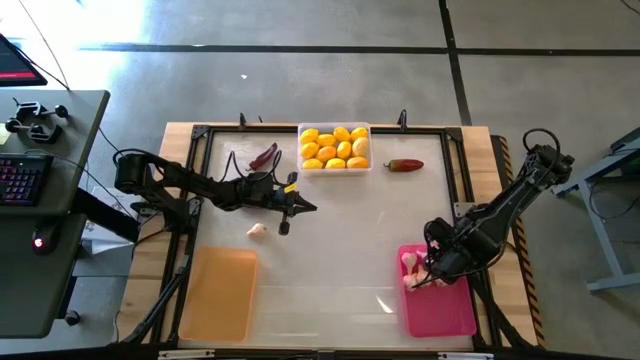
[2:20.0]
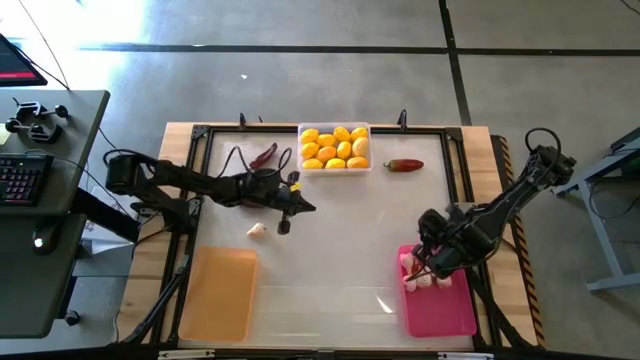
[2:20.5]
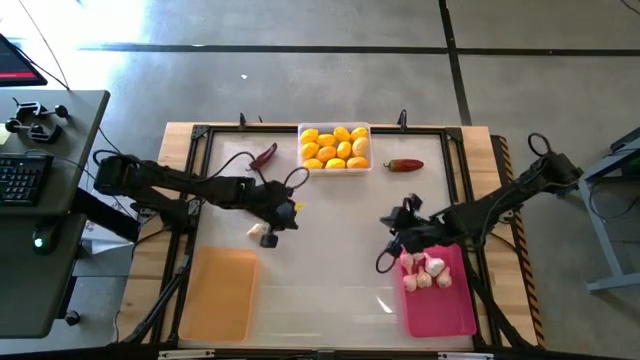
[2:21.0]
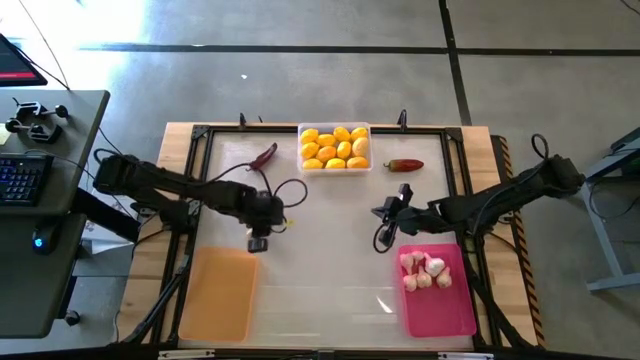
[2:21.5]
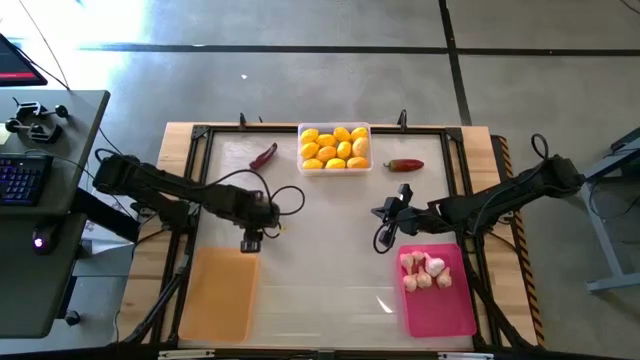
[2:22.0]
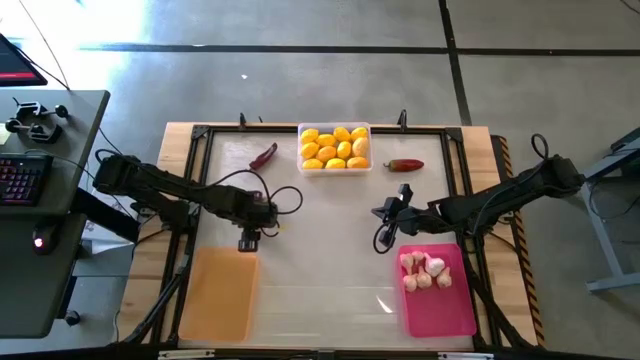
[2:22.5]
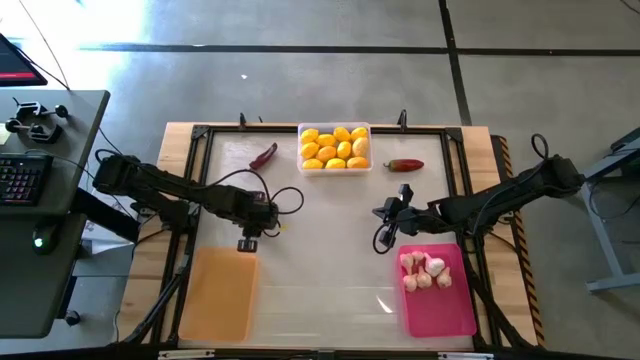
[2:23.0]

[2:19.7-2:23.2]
Task: Sort produce into baskets
Put the garlic into the pink bin

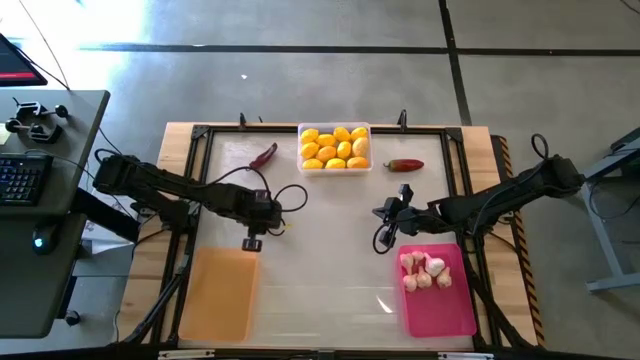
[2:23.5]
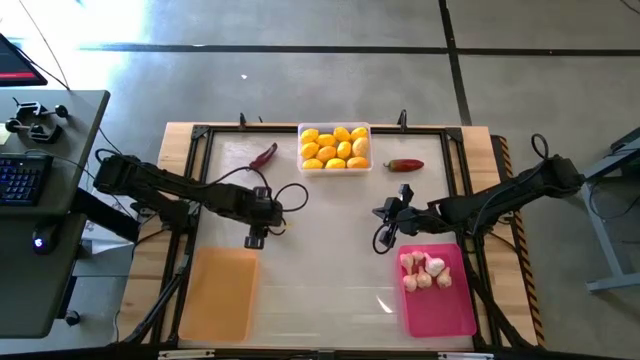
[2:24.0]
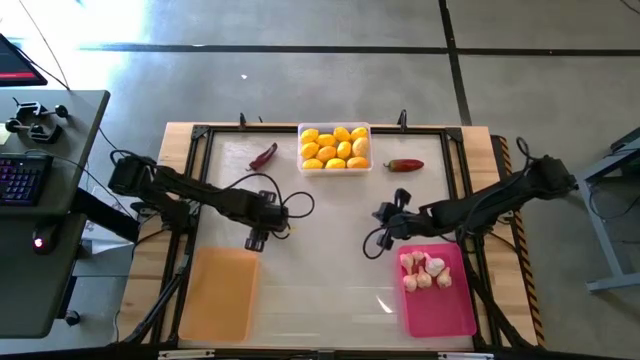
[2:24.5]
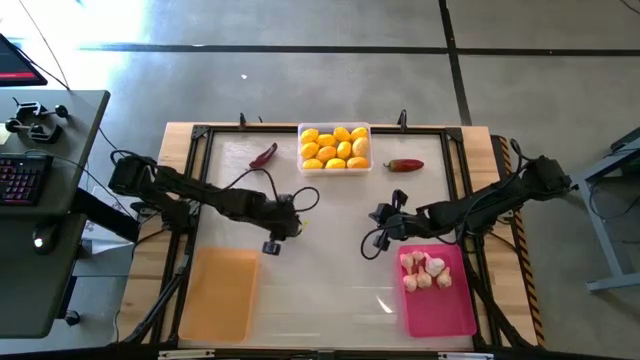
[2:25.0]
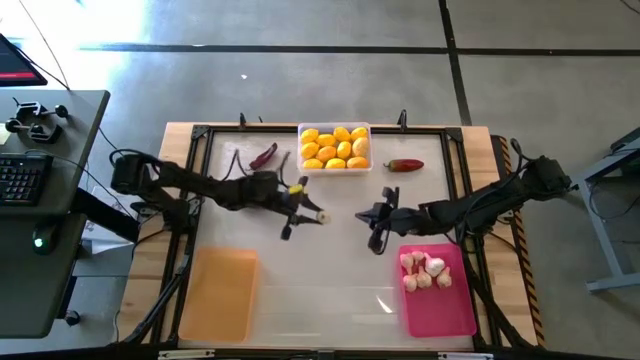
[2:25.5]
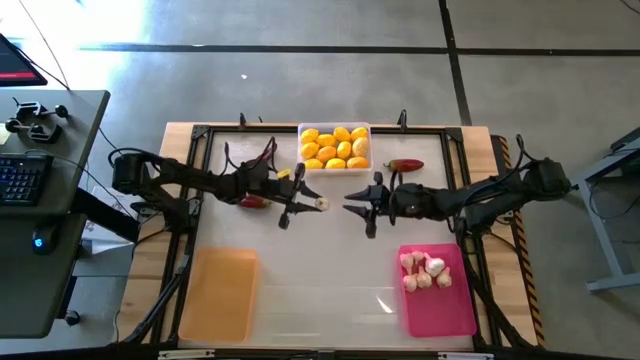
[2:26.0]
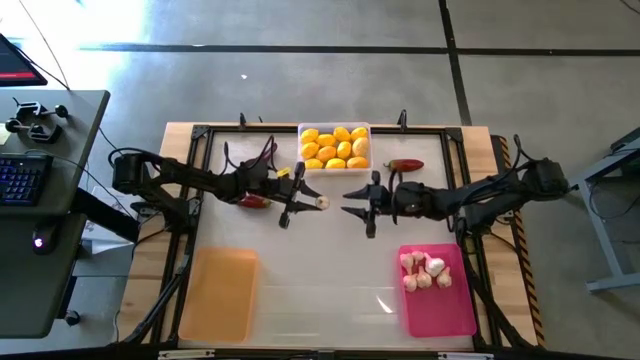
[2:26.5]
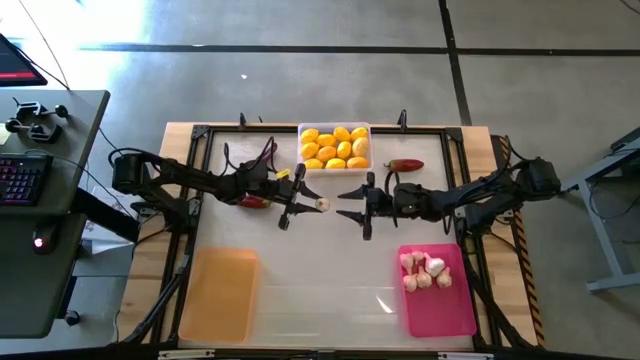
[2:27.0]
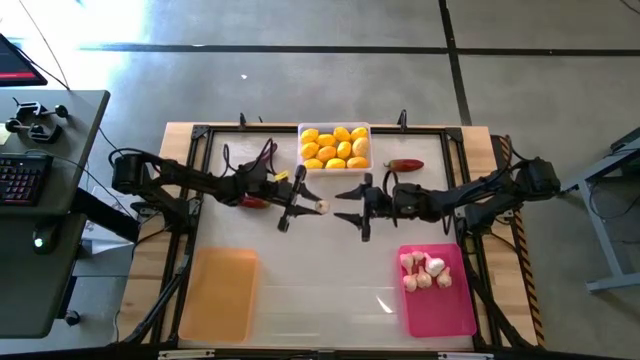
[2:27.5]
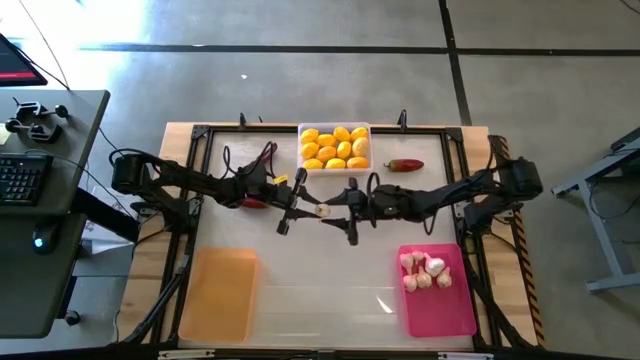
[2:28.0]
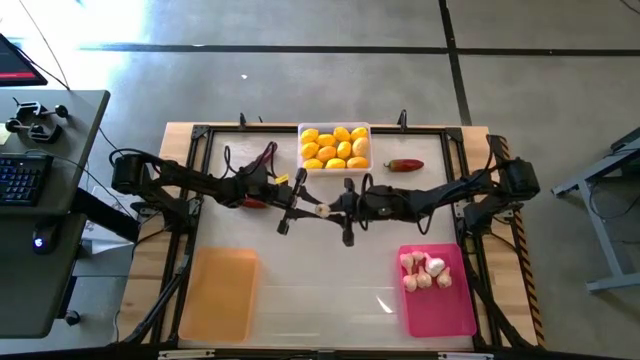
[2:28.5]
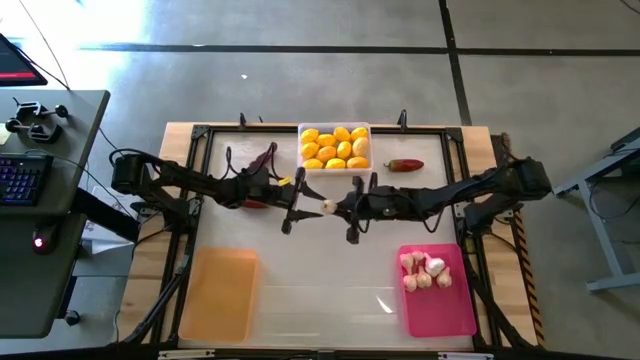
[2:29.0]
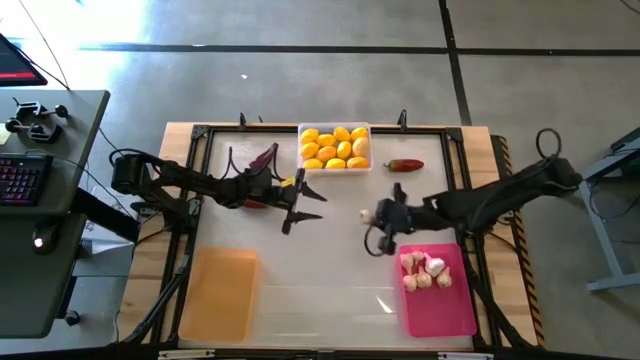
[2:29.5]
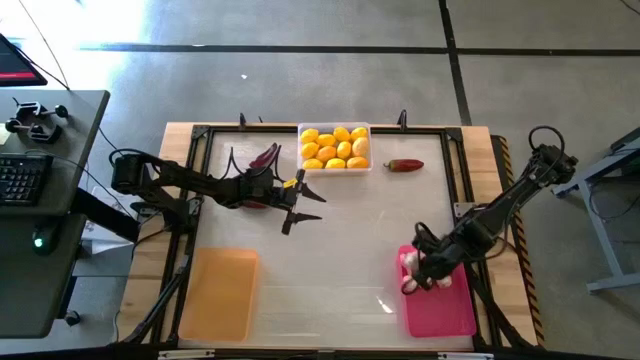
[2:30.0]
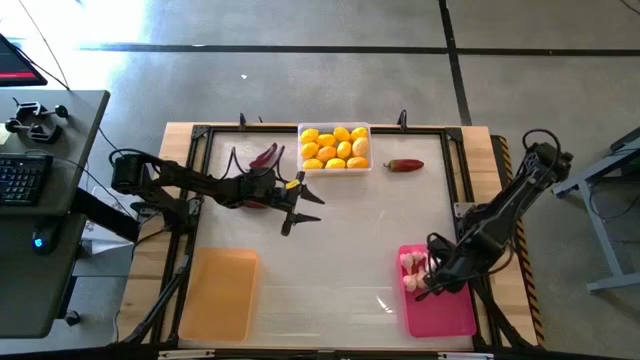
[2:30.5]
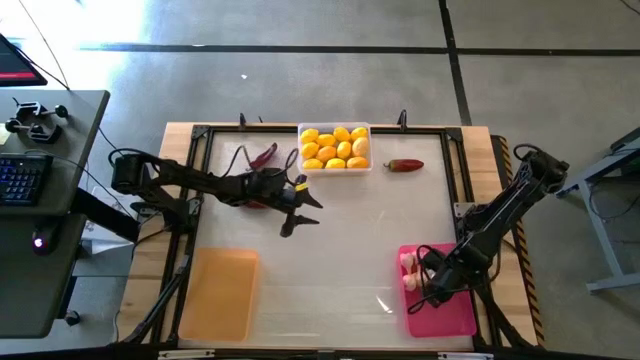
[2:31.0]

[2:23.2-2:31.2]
Put the garlic into the pink bin

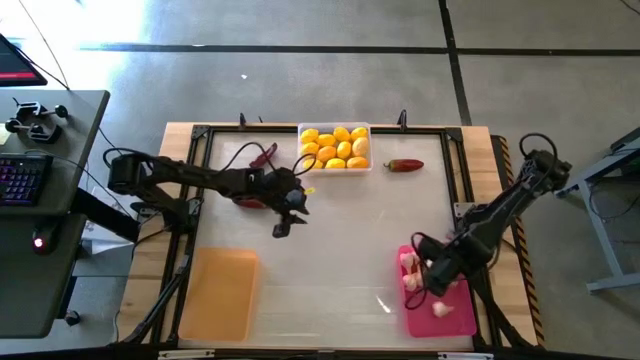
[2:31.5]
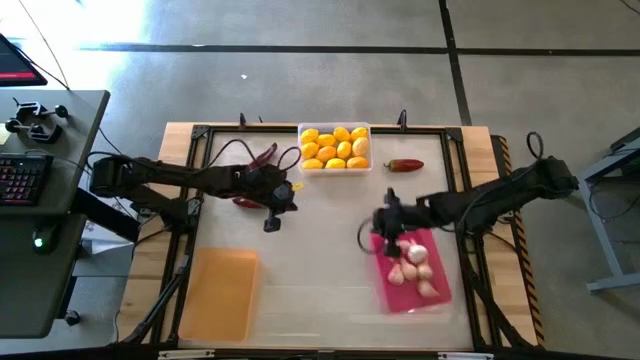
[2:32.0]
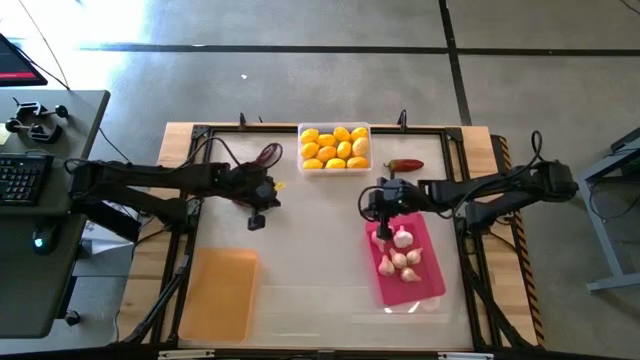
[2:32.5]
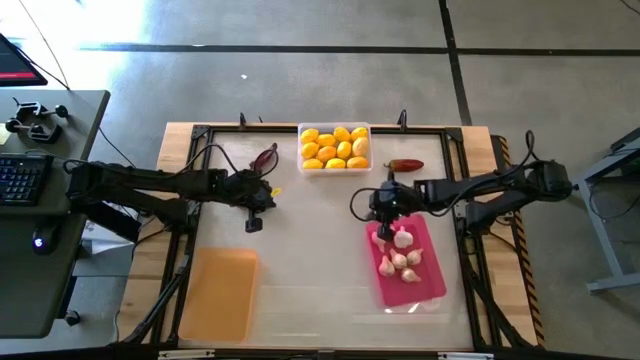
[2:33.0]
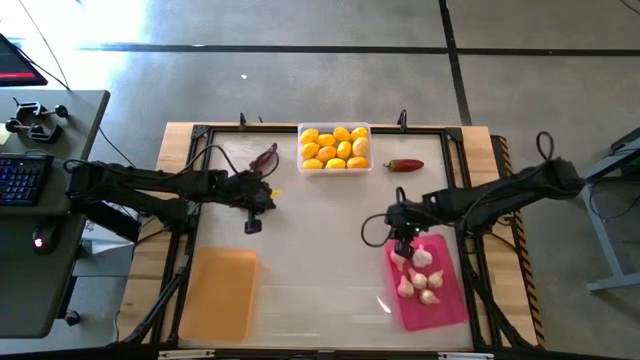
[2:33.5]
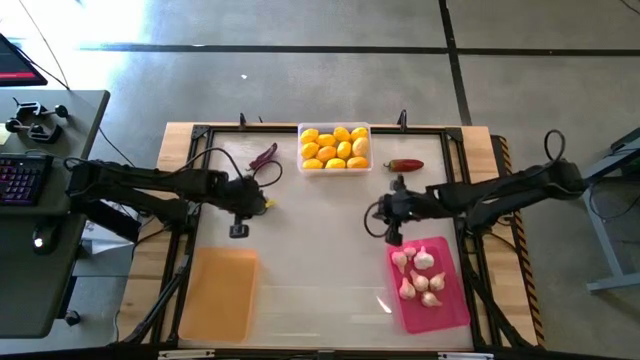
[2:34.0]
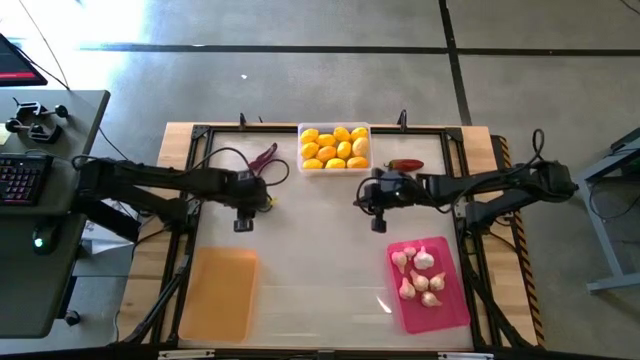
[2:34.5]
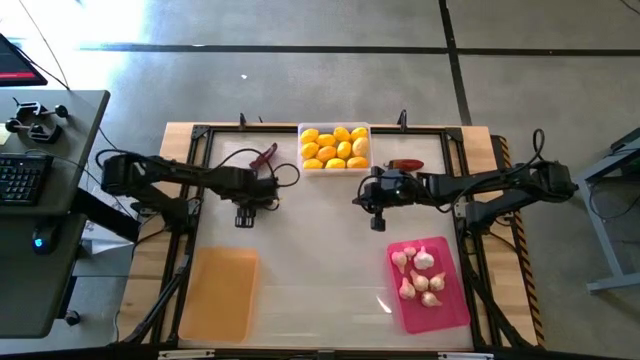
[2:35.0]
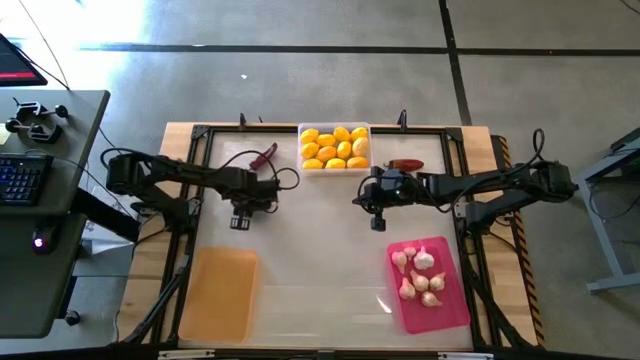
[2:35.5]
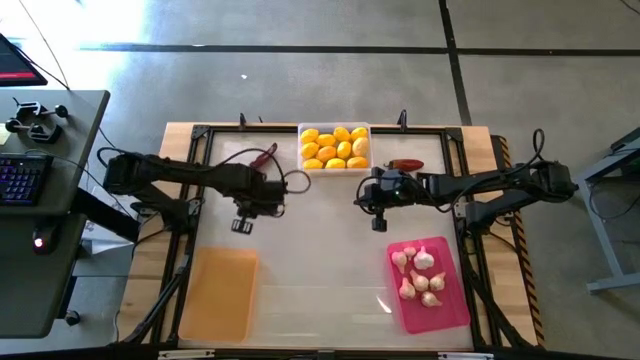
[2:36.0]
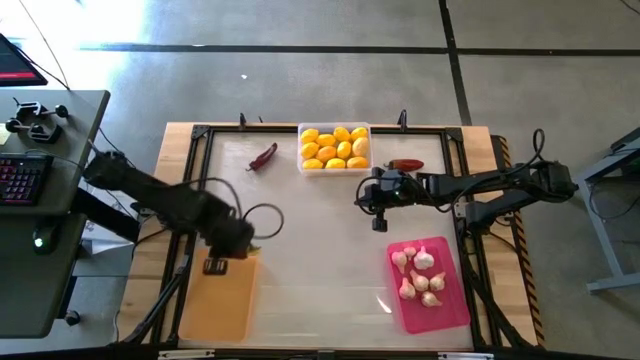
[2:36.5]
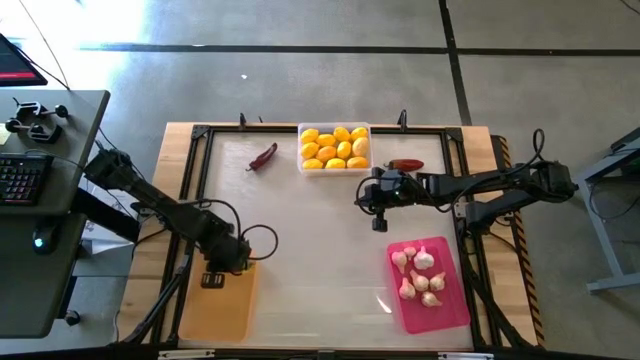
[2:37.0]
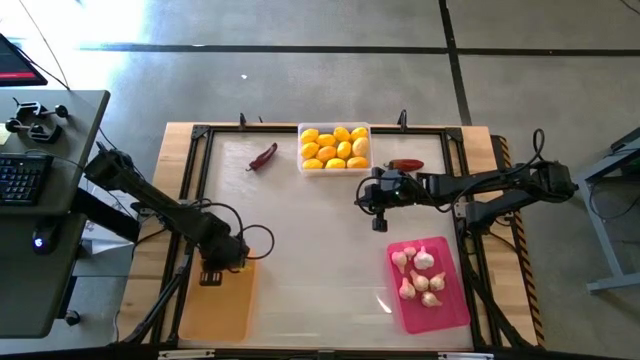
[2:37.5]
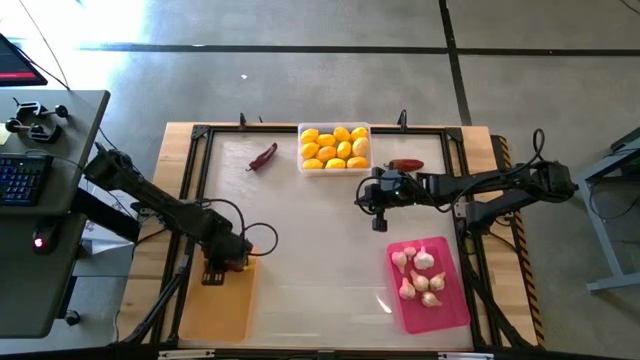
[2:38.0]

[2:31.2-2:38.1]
Put the bottom left chili pepper into the yellow bin

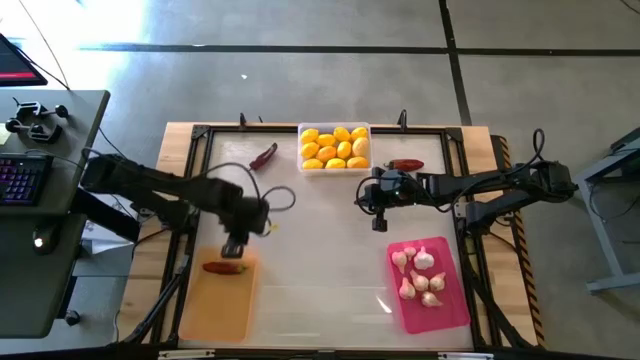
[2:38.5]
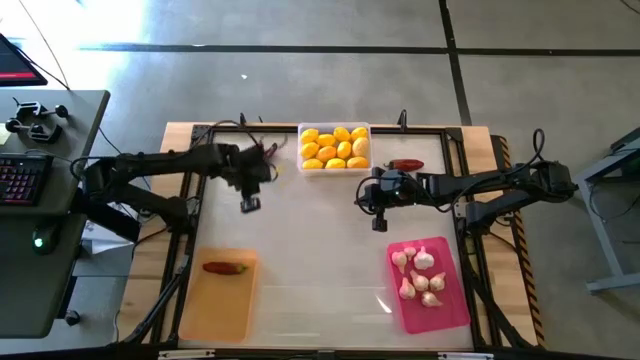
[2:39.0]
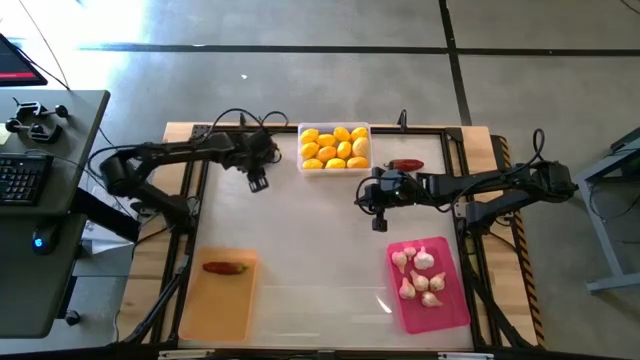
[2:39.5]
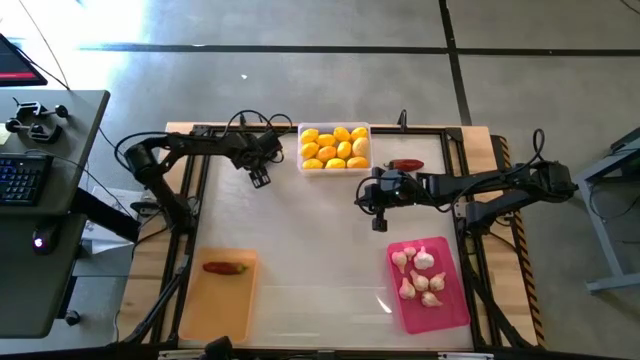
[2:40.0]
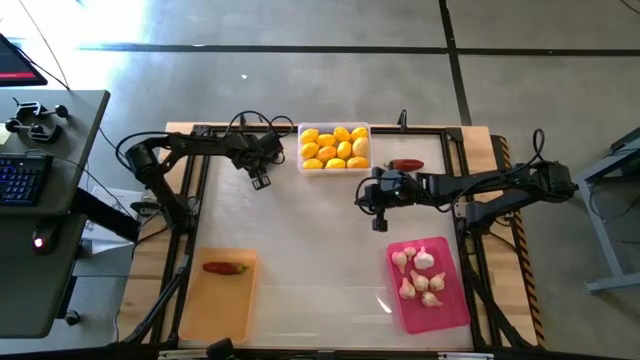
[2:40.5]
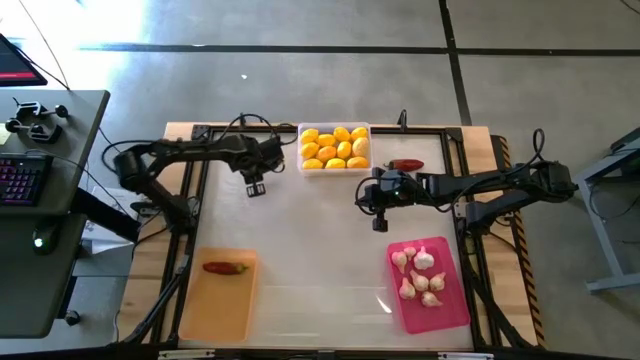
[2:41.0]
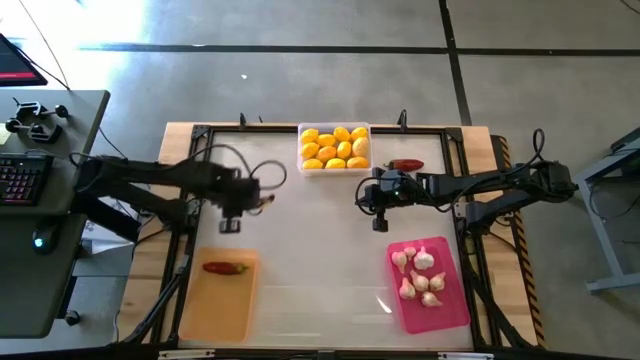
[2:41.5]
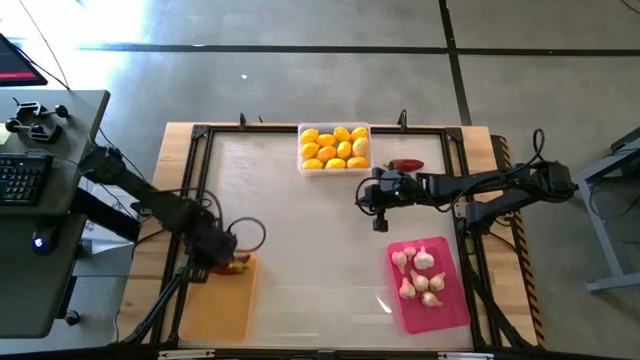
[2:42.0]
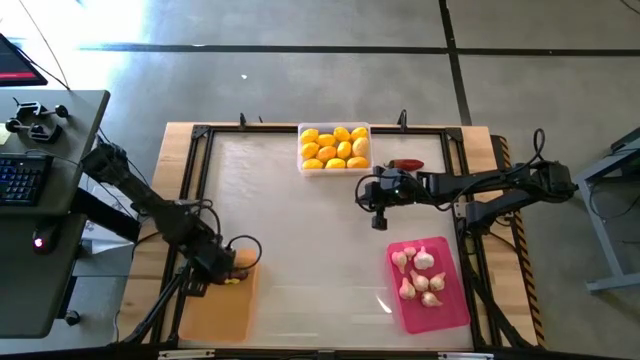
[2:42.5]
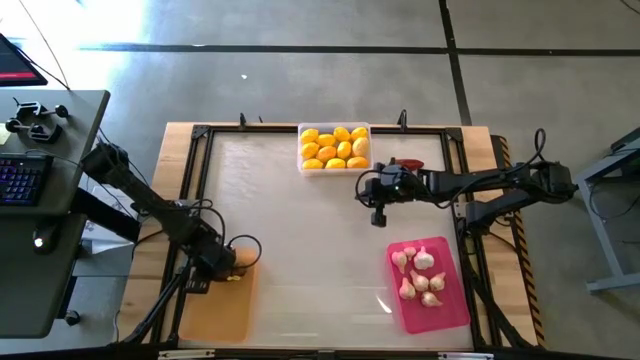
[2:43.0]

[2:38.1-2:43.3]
Put the left chili pepper into the yellow bin
